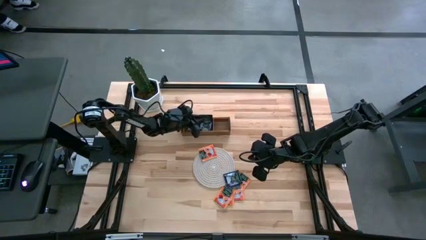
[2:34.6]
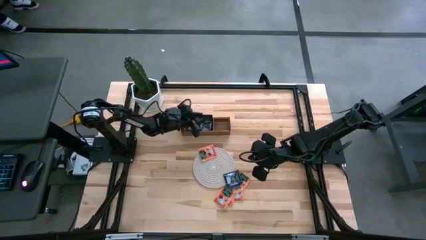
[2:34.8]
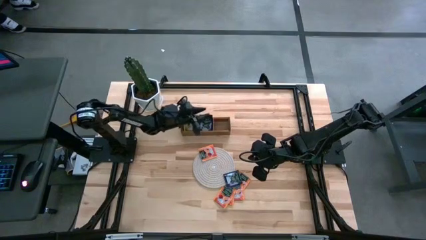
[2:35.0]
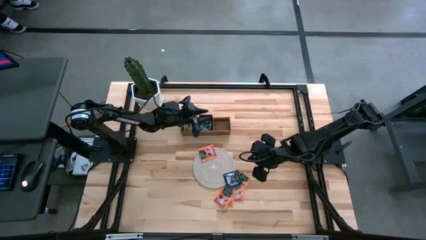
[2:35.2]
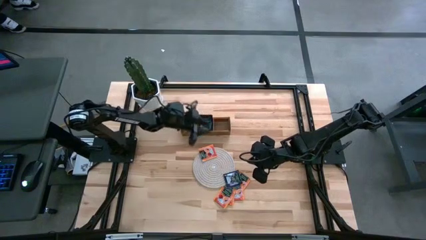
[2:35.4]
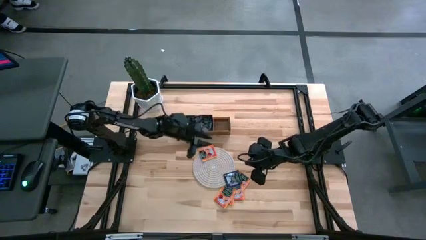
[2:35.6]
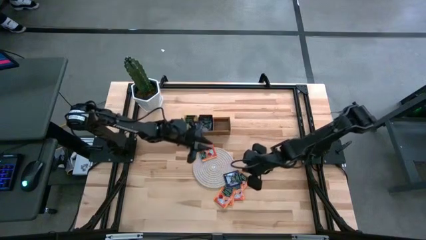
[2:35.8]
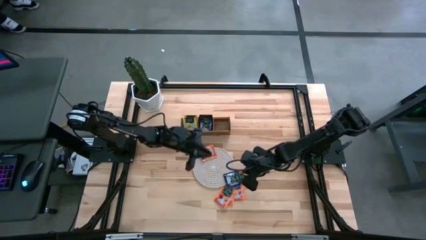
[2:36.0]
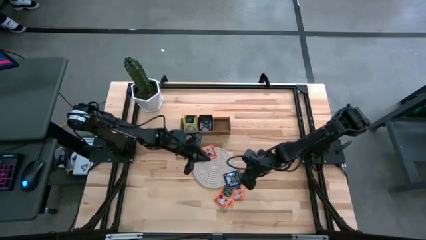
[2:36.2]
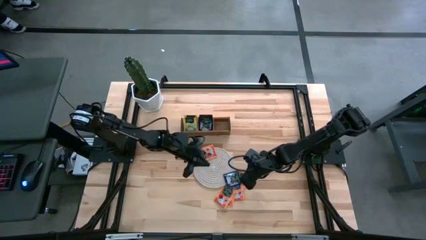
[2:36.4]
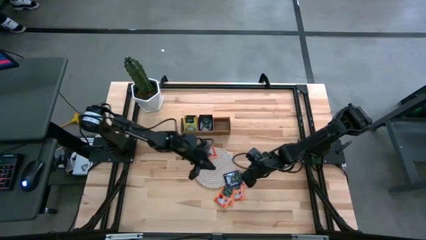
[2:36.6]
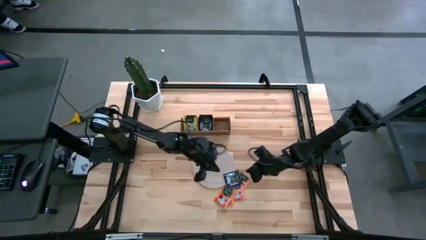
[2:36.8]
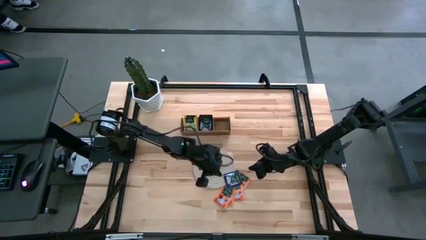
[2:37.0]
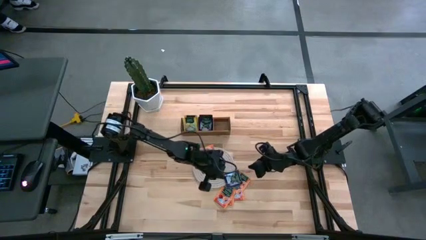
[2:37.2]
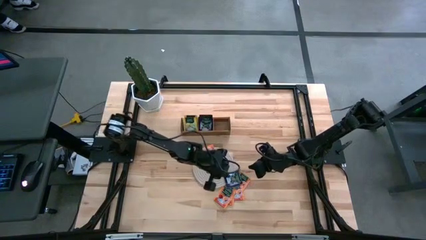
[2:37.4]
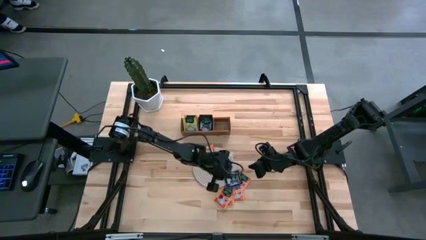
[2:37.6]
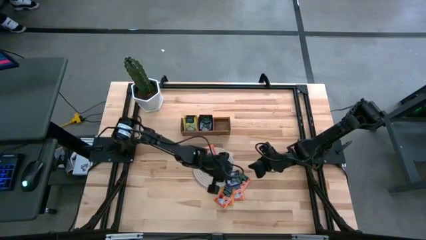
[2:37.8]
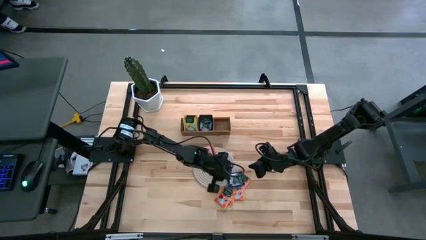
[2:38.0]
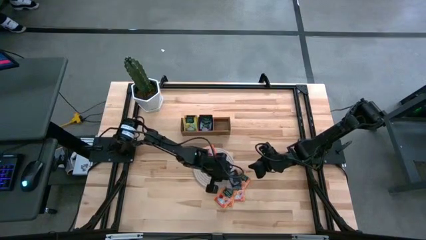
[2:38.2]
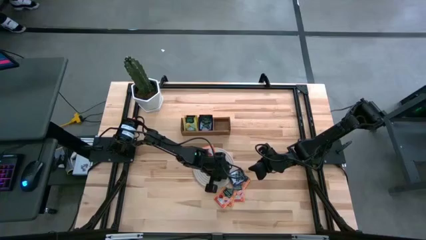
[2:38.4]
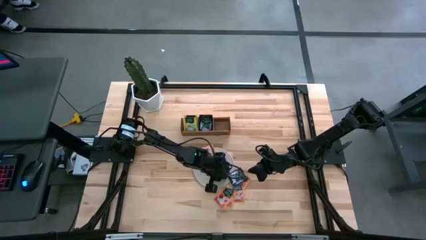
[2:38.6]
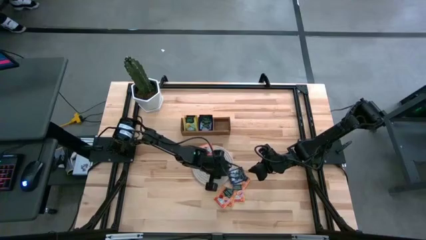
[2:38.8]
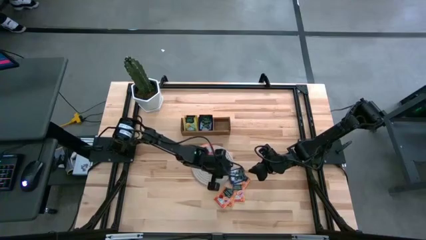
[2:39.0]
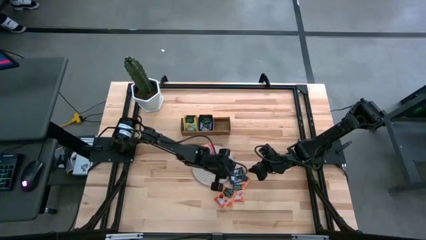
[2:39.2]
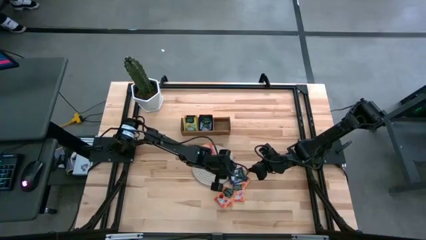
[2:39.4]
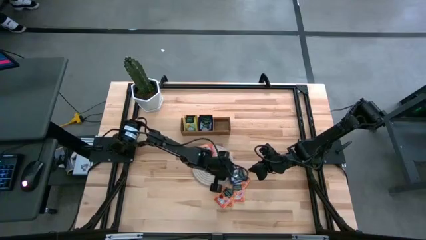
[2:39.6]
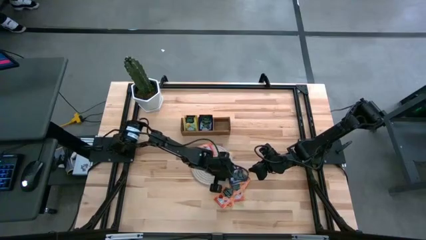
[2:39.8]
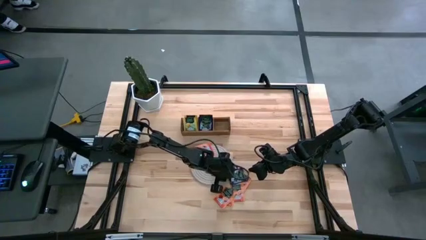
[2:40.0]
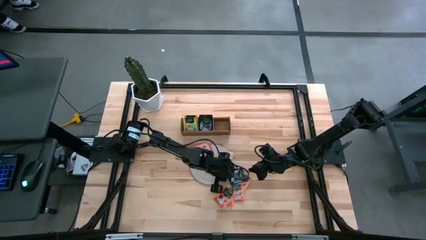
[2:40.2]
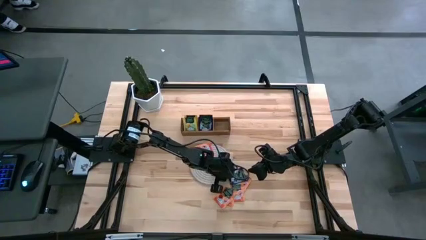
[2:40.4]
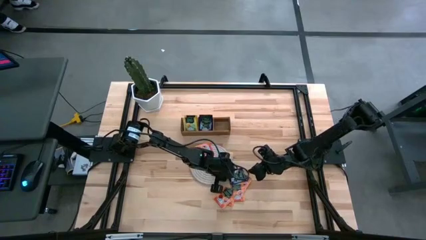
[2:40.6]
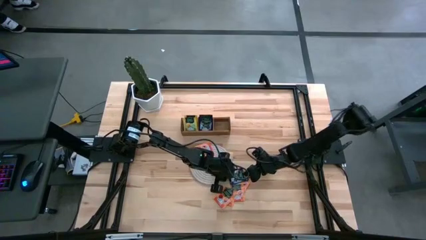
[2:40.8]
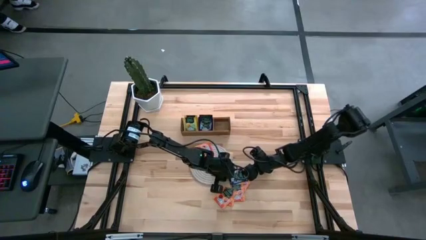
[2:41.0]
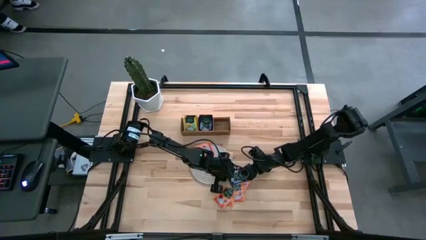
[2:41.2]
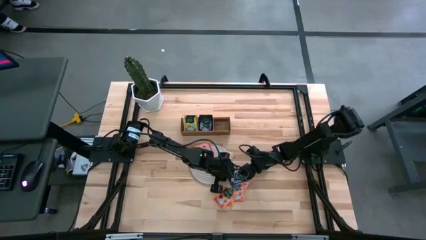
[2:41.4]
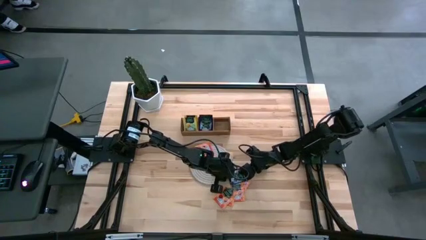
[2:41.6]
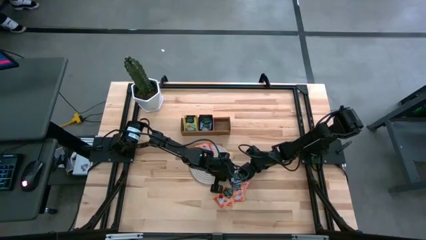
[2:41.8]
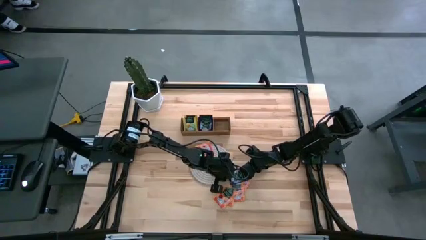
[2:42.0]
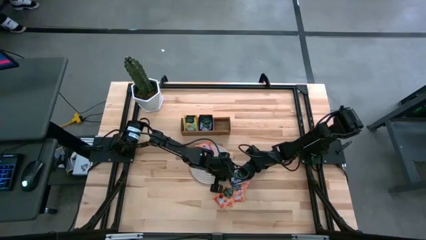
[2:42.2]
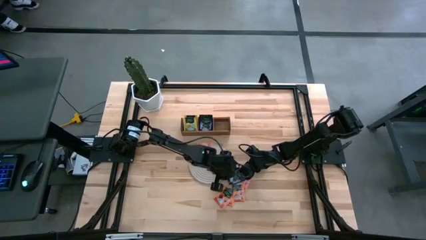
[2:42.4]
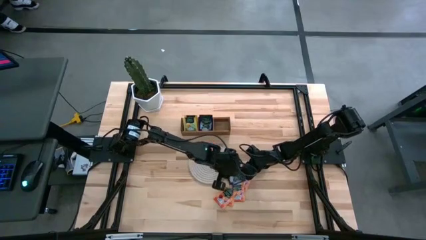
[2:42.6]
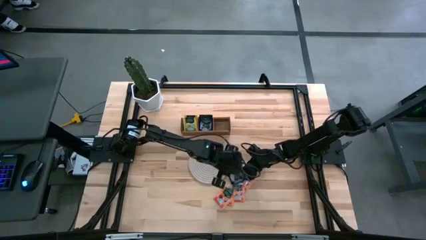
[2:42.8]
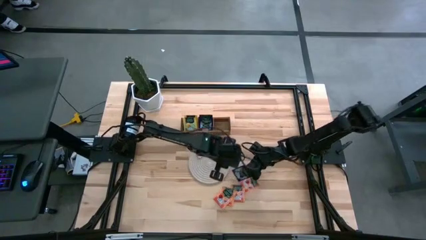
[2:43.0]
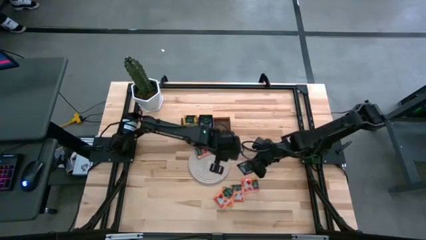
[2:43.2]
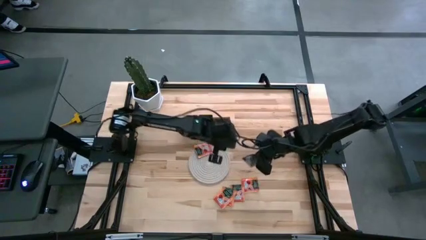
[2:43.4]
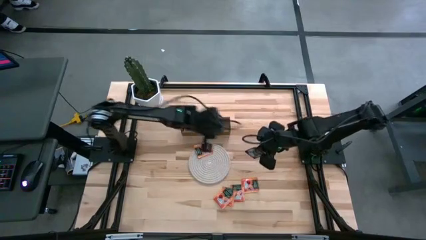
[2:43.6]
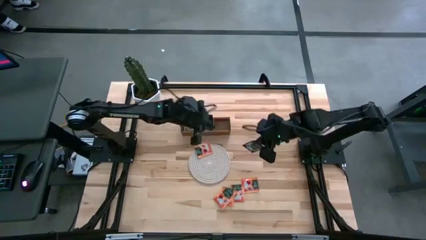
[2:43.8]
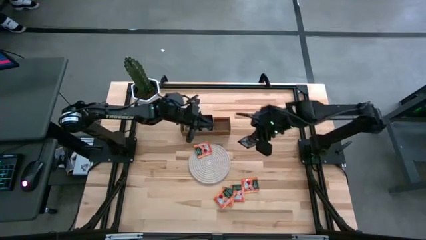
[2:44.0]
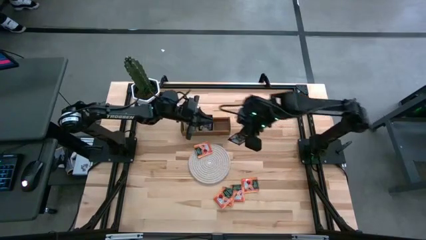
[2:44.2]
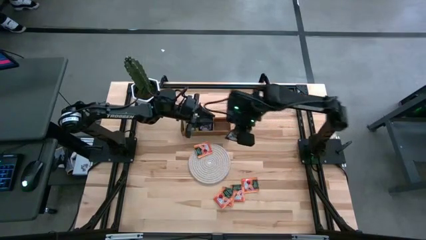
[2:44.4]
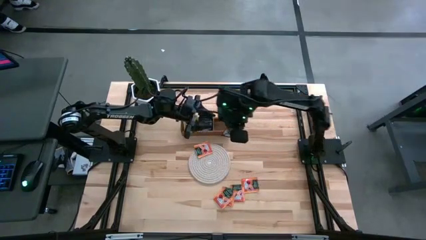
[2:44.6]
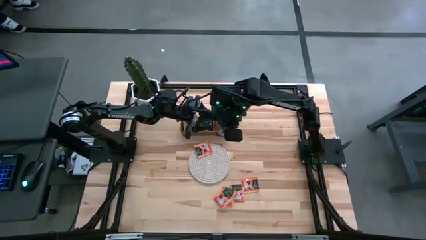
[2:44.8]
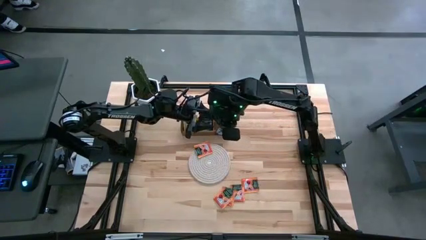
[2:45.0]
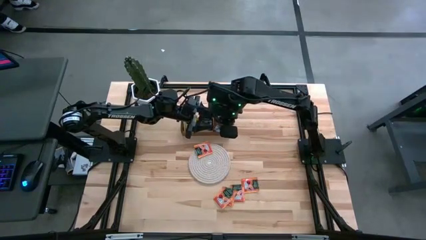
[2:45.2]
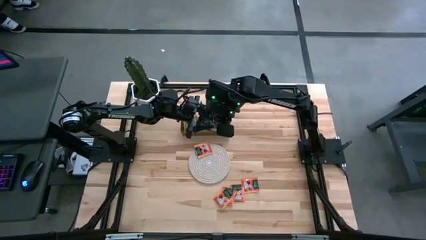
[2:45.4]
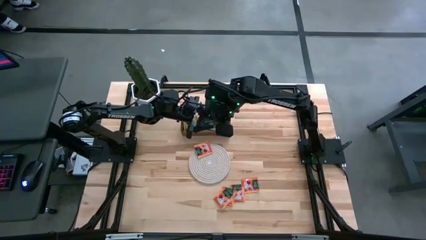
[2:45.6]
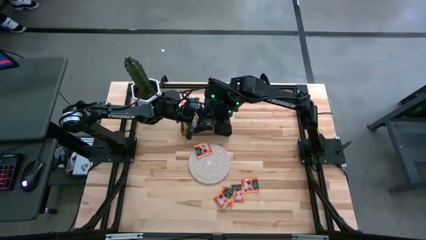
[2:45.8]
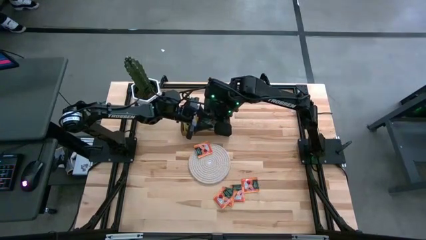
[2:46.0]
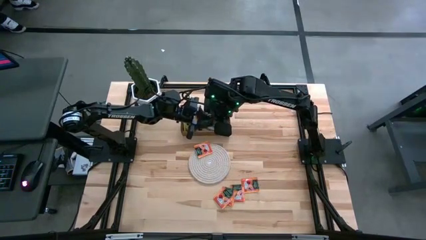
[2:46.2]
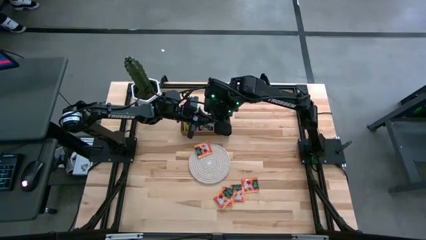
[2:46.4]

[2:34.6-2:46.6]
Task: Pick & Place Tea
Put the purple tea bag into the middle section of the wooden organizer

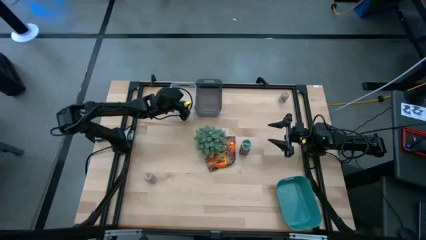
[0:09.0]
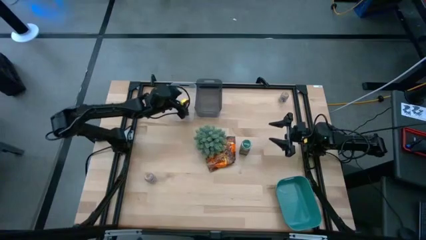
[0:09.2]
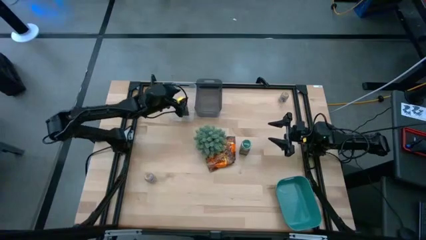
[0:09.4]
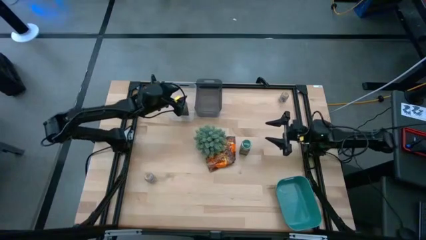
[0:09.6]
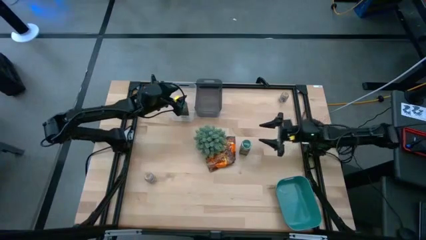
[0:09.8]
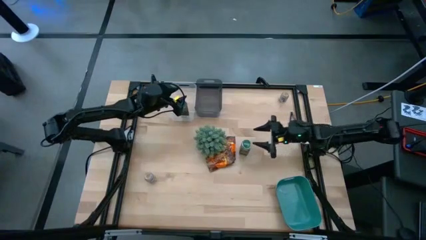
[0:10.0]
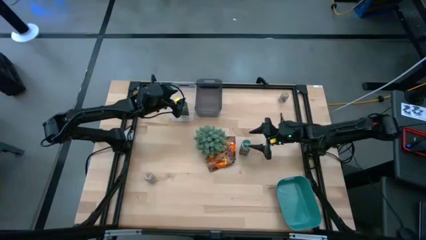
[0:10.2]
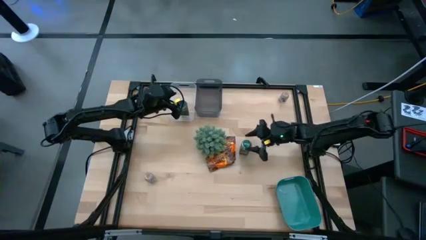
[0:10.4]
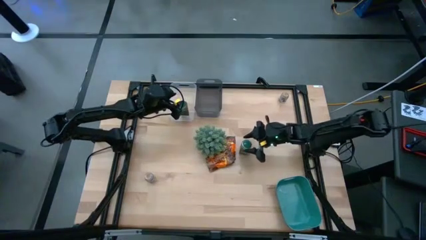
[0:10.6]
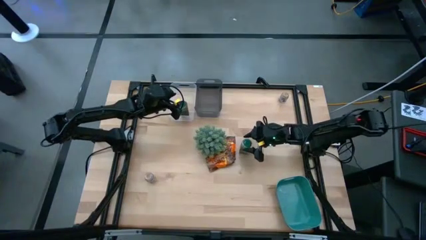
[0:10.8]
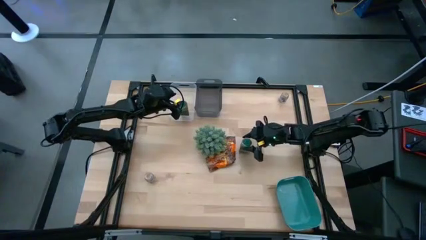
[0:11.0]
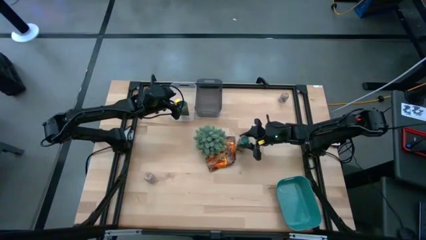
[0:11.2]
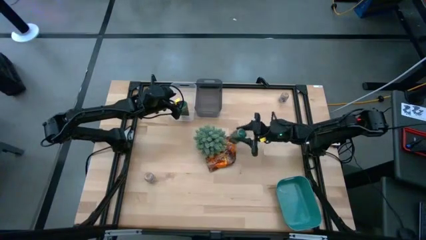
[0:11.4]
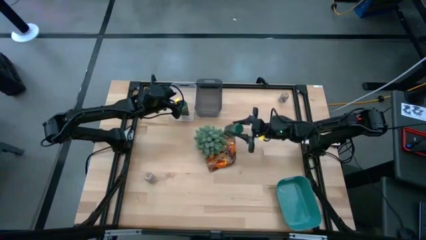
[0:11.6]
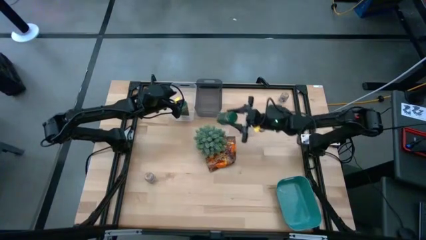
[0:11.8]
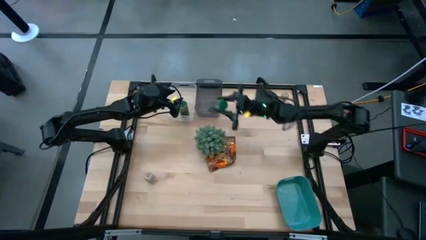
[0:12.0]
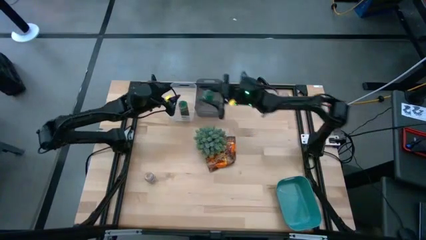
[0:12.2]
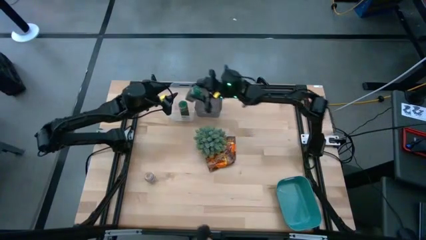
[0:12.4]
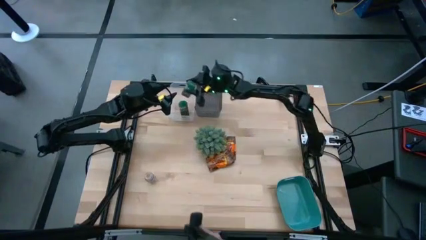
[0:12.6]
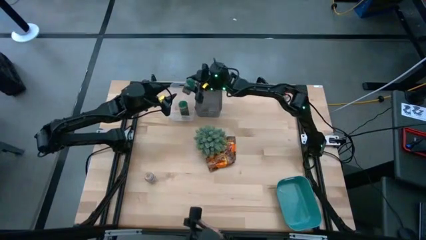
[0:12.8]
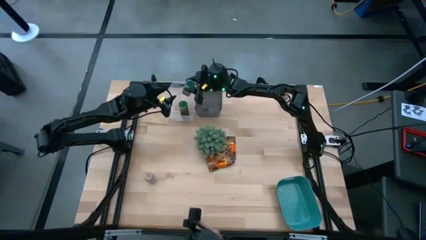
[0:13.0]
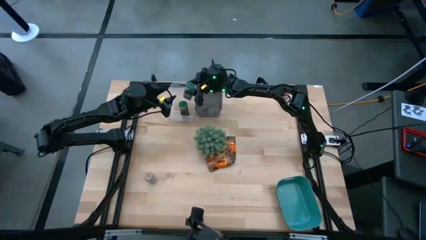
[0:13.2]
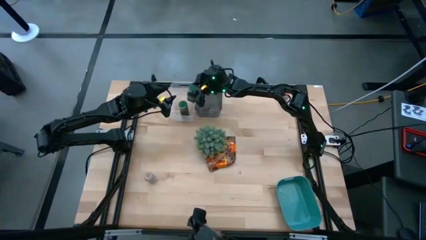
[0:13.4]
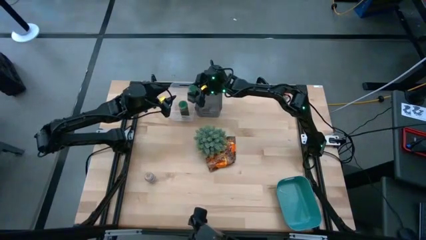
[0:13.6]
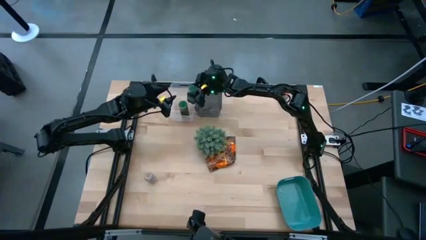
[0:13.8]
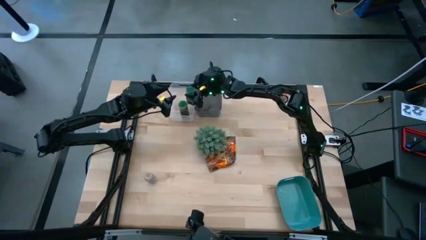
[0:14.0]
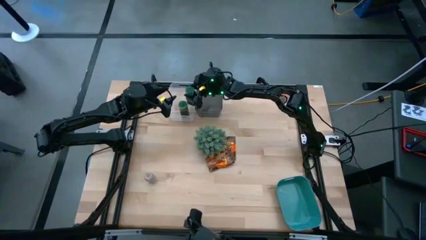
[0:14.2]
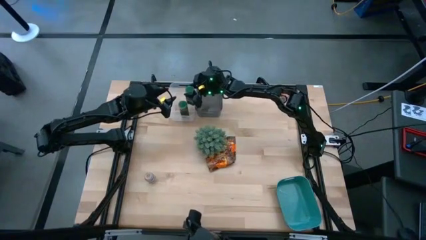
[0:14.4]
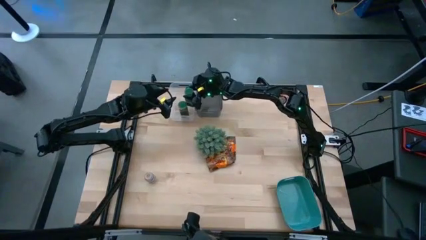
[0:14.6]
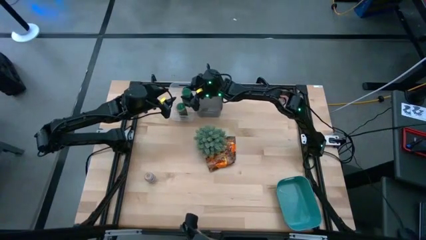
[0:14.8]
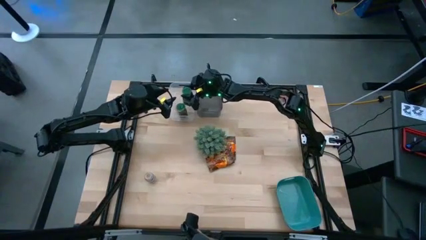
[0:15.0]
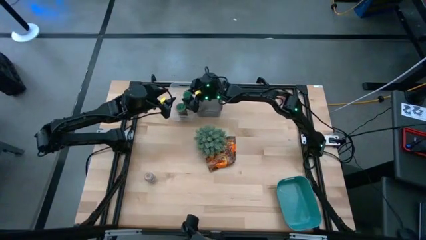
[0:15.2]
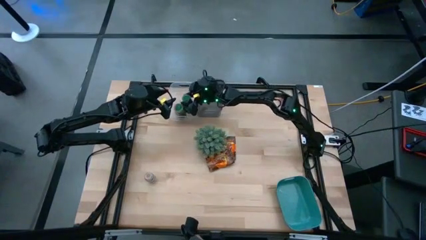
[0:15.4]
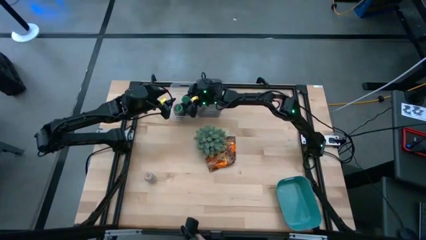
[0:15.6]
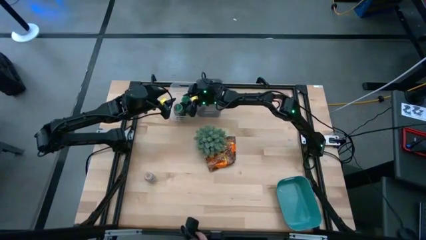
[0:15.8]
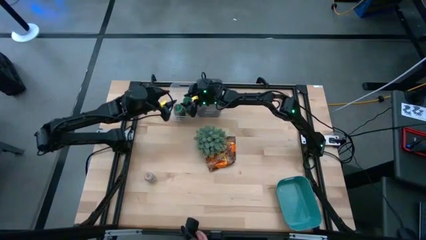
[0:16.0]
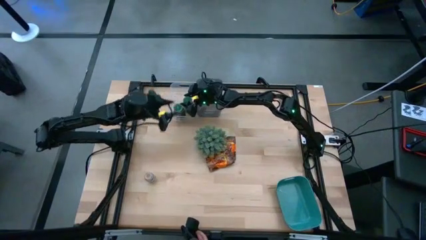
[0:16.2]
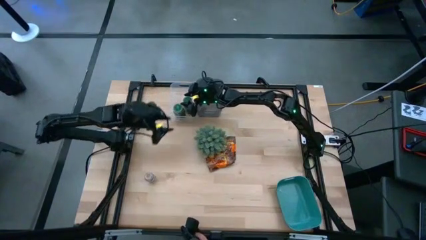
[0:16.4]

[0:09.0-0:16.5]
Task: Sort spices by type
Put the green bottled seasoning into the transparent bin
